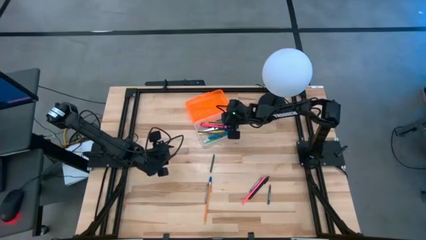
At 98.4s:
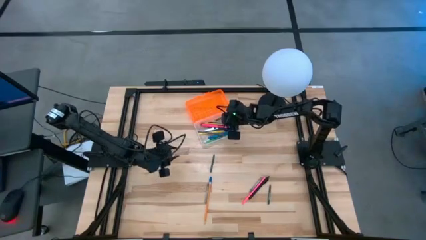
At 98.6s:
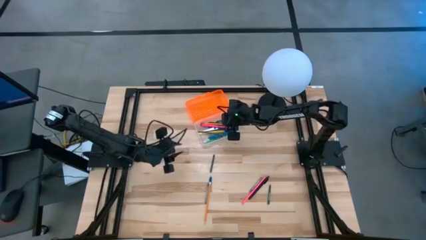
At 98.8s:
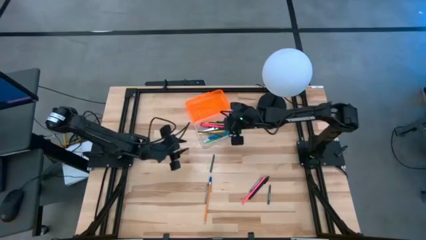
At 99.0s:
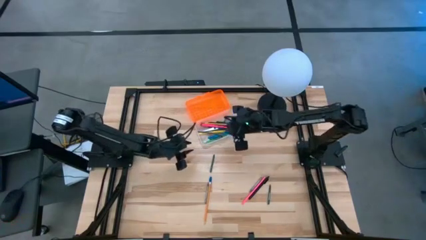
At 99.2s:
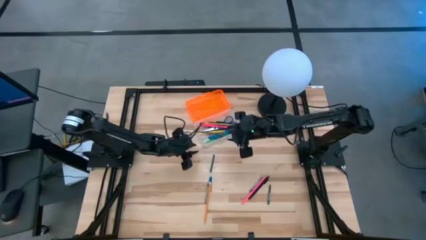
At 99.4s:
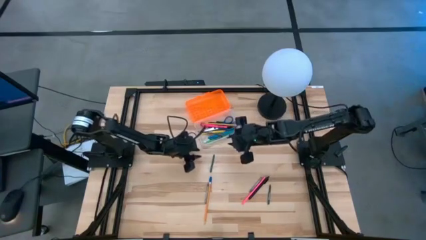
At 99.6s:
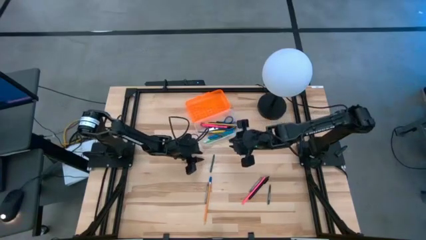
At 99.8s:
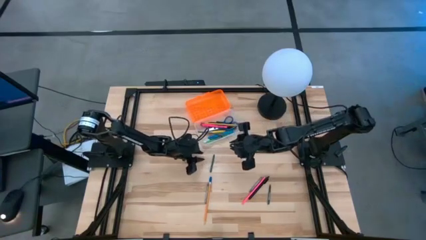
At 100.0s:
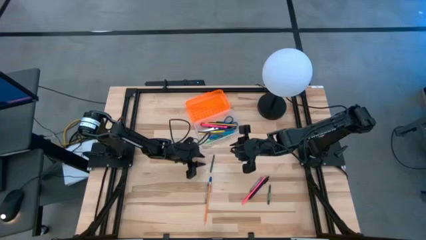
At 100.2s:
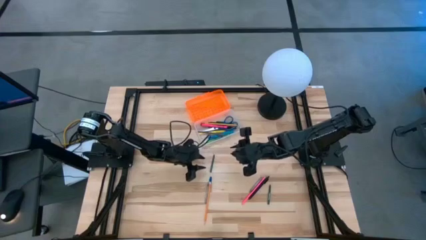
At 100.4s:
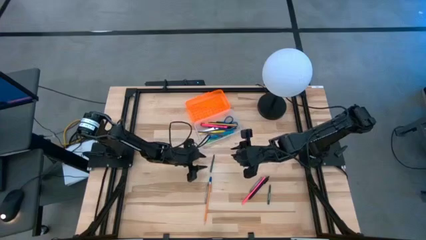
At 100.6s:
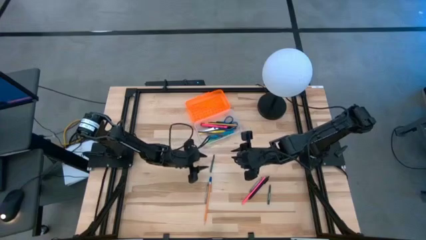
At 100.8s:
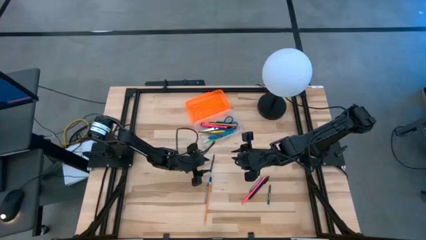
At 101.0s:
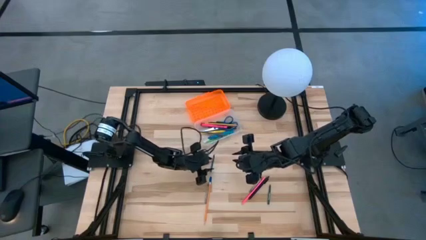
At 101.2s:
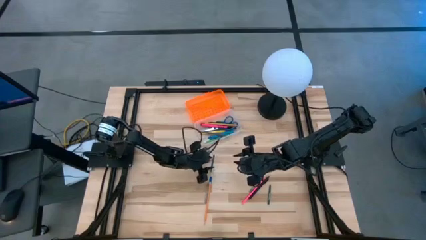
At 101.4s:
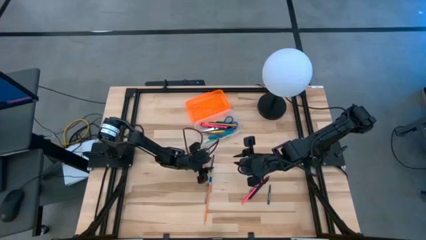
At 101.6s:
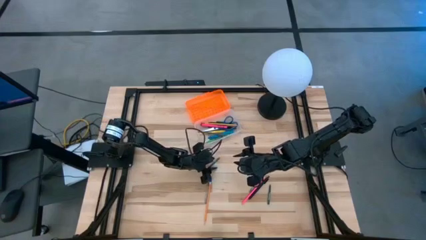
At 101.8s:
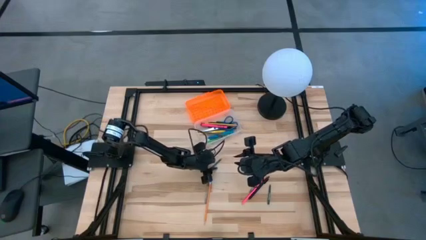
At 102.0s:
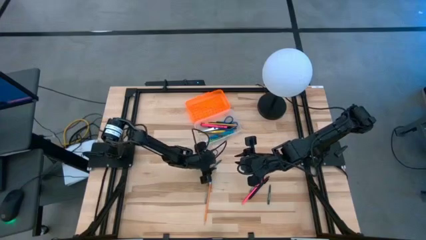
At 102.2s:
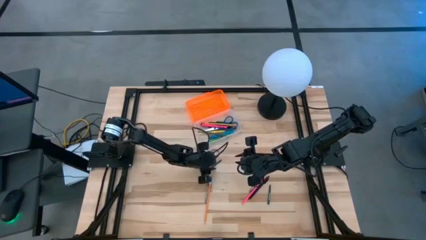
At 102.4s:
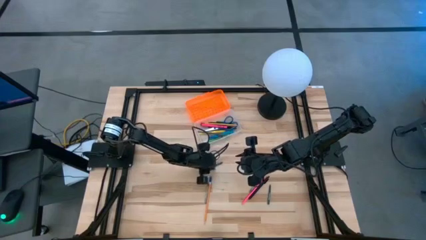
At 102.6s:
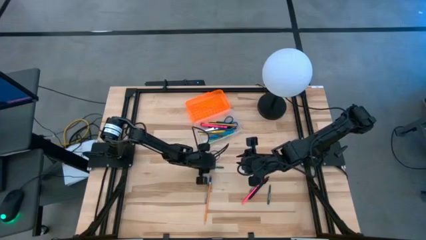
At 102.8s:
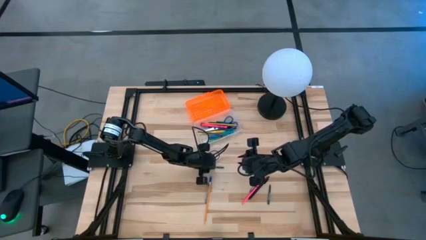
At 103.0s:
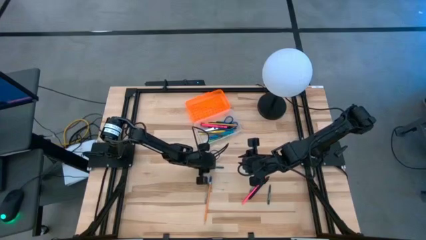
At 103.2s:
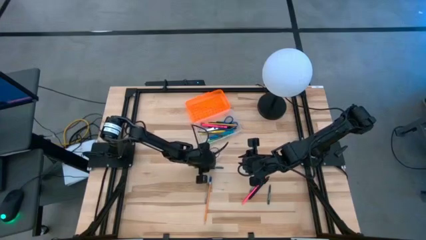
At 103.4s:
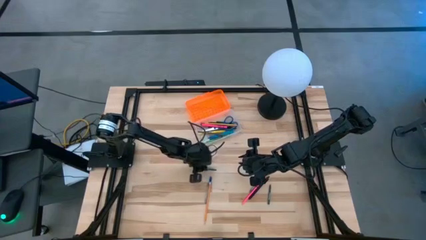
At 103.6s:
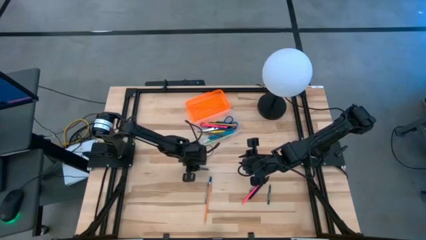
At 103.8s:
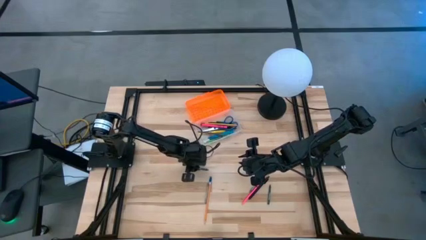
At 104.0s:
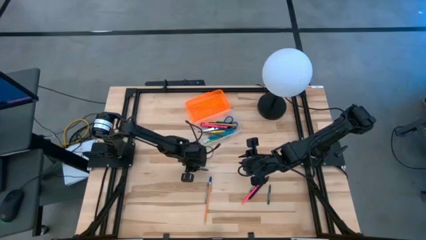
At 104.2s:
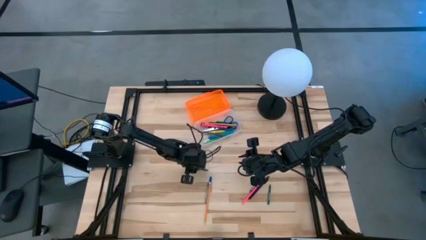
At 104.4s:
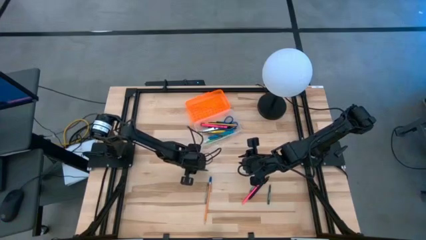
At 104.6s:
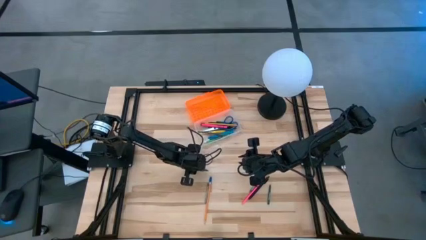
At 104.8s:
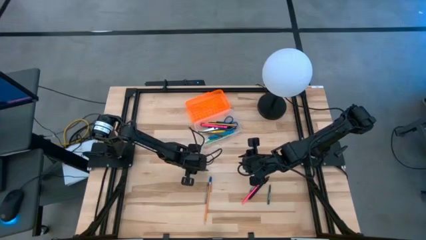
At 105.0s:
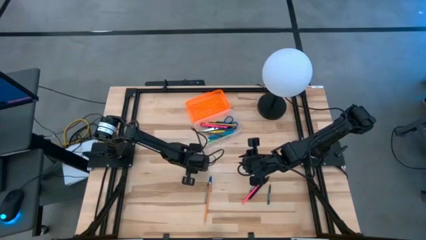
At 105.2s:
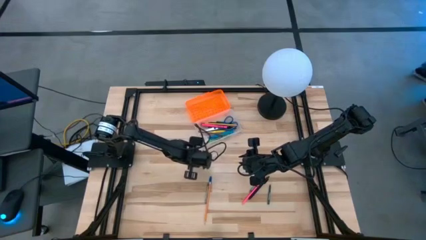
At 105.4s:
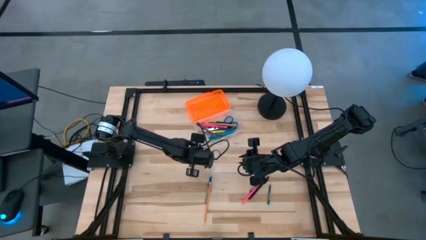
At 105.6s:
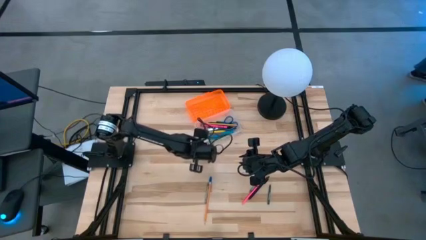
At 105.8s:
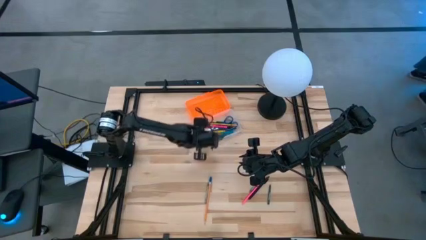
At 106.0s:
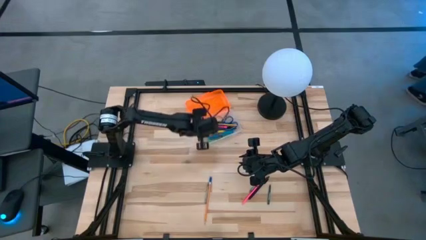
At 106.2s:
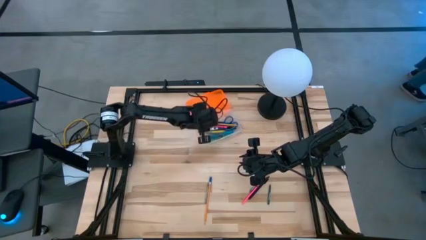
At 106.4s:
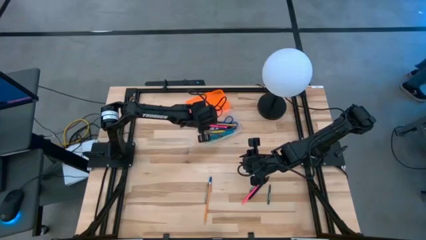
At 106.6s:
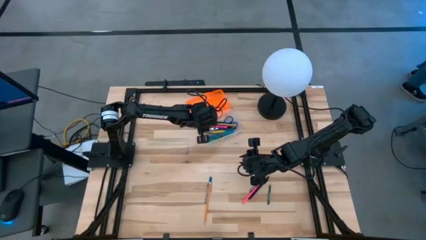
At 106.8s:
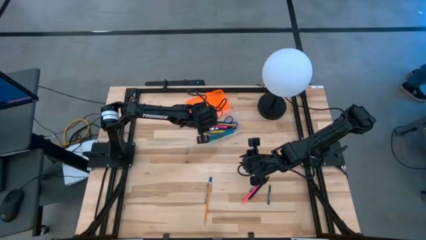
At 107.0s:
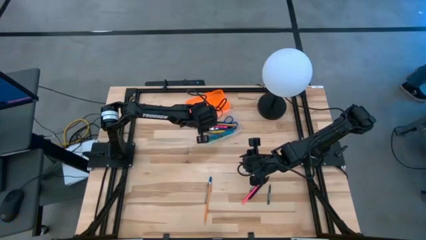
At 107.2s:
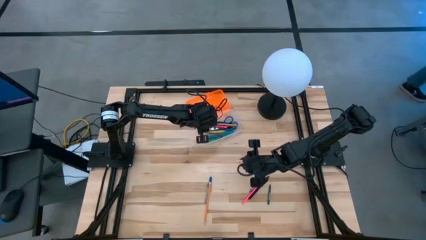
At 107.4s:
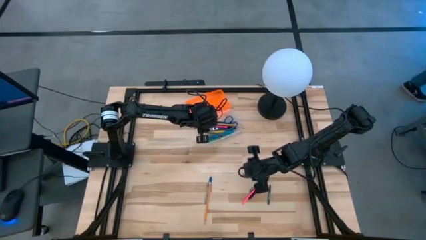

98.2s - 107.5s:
Task: Pick & place school supplies into a supply box
Put the top green crayon into the supply box

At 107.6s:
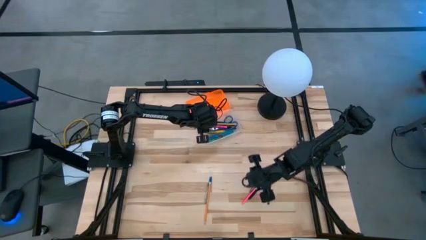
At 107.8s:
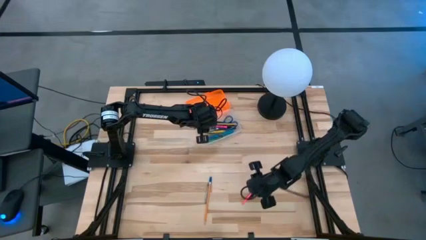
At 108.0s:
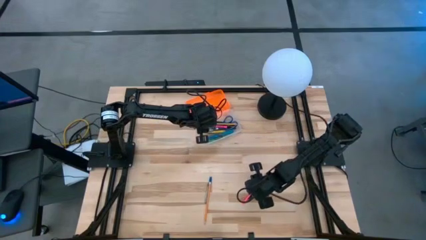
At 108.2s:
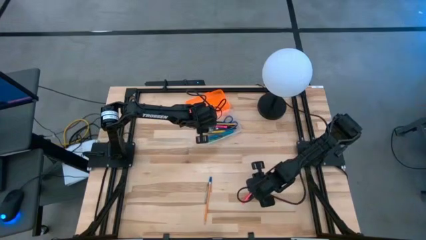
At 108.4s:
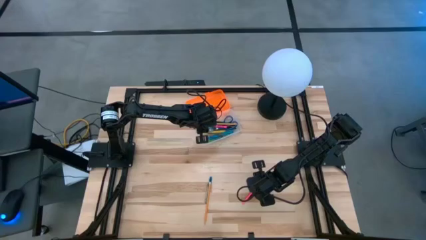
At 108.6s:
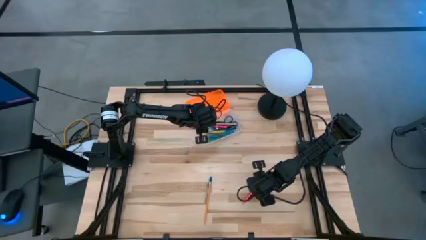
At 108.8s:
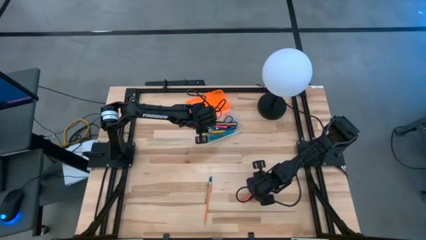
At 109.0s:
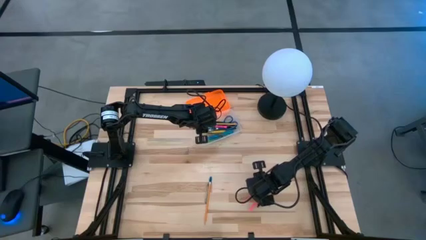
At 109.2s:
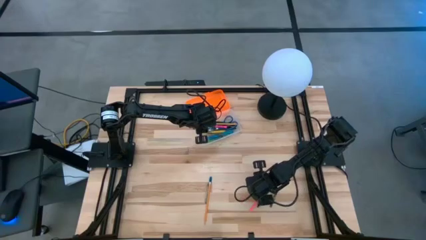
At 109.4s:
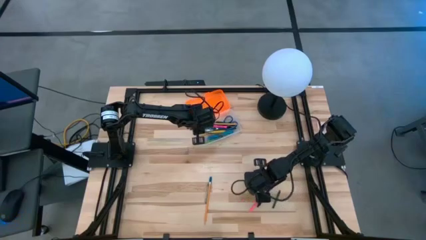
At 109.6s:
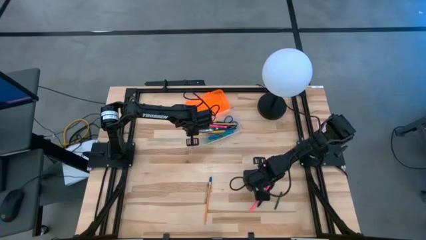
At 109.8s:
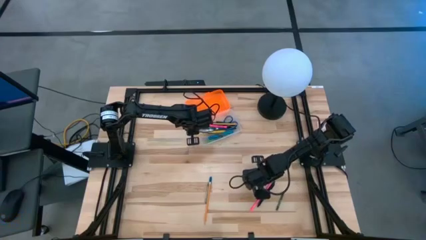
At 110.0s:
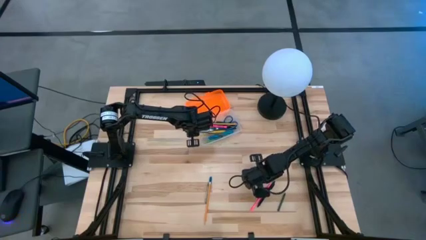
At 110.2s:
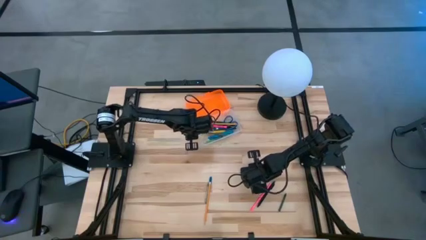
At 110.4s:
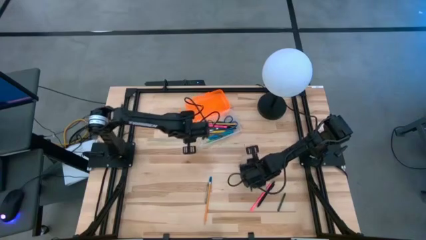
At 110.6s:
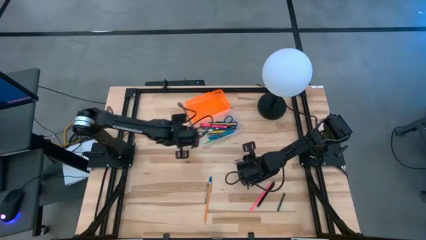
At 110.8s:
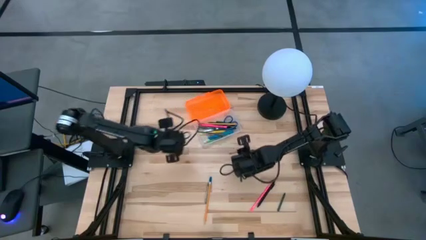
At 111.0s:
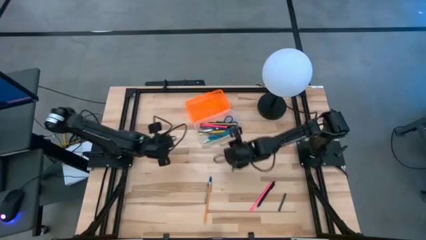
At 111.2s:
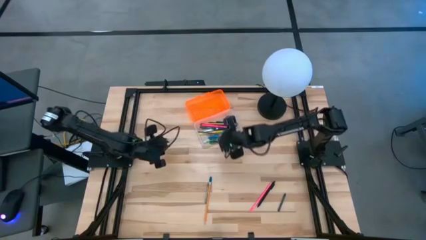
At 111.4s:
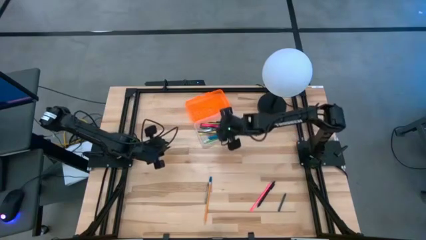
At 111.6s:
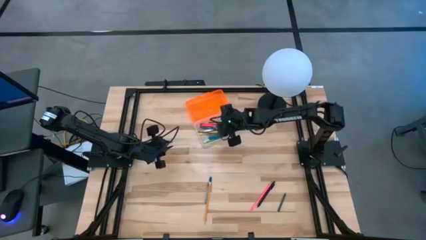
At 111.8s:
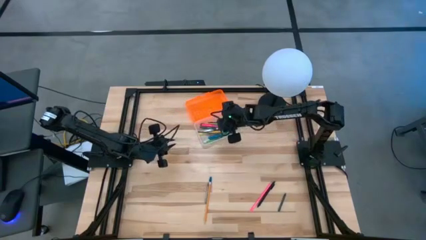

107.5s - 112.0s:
Put the right gray crayon into the supply box

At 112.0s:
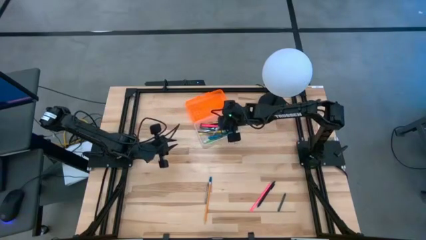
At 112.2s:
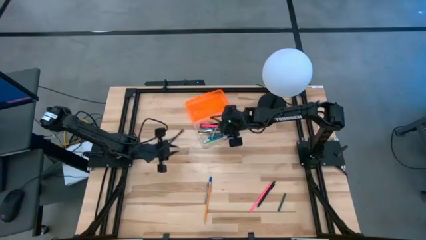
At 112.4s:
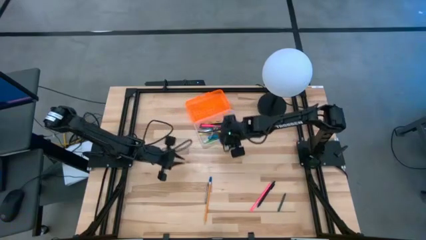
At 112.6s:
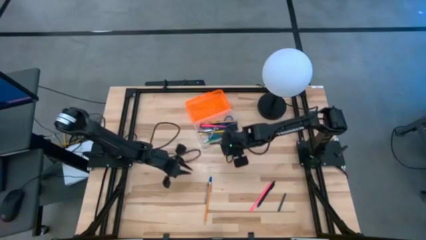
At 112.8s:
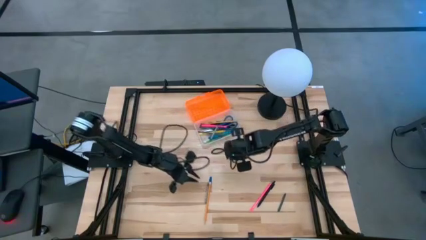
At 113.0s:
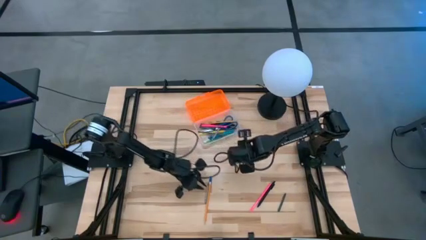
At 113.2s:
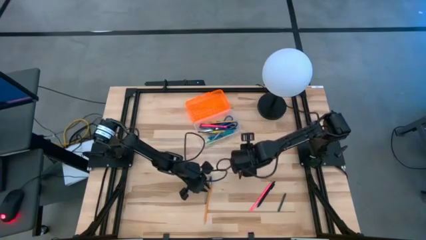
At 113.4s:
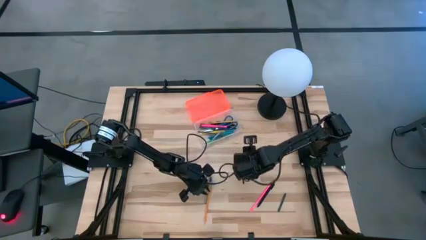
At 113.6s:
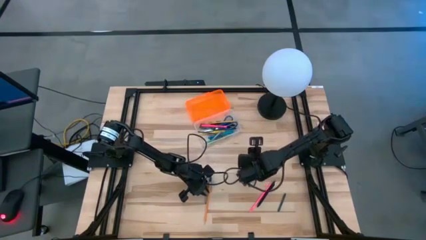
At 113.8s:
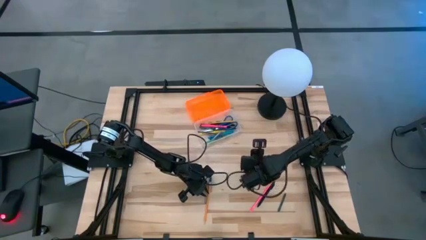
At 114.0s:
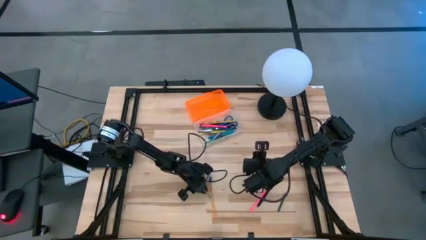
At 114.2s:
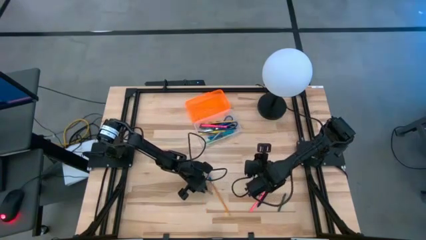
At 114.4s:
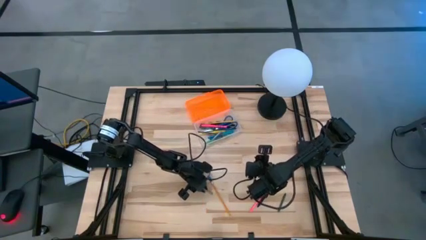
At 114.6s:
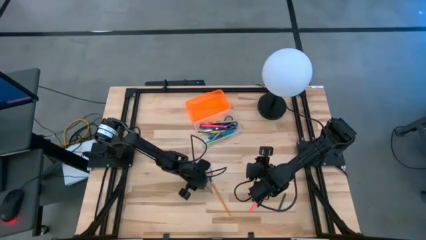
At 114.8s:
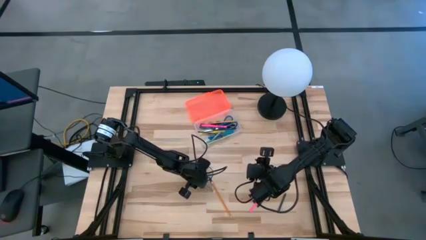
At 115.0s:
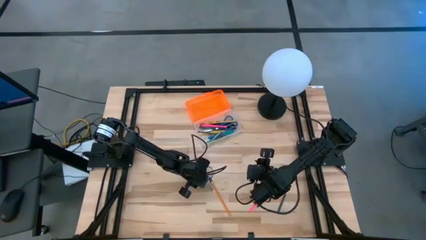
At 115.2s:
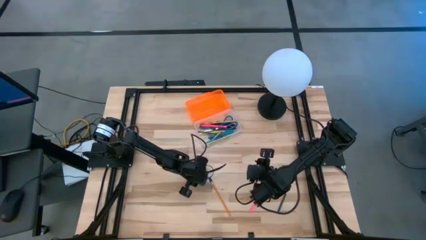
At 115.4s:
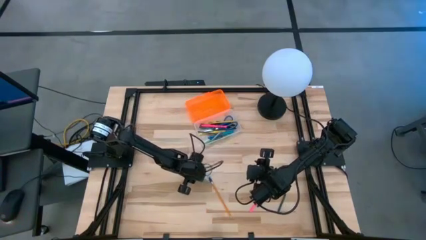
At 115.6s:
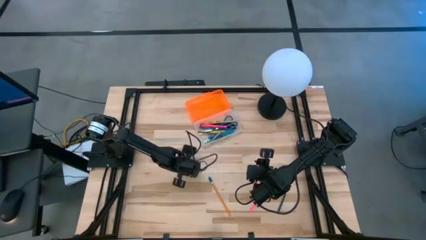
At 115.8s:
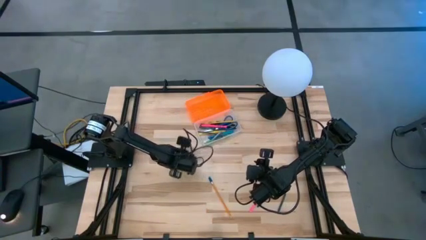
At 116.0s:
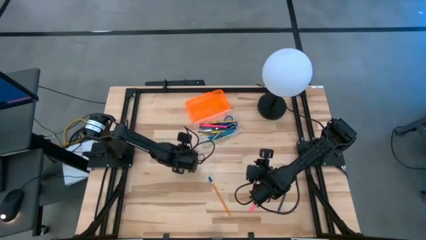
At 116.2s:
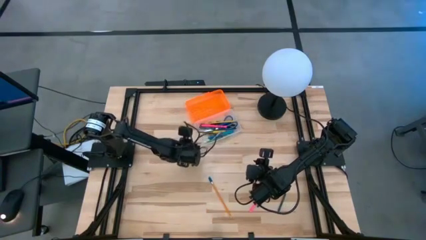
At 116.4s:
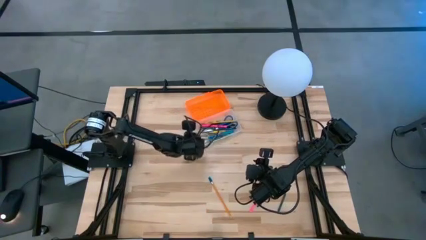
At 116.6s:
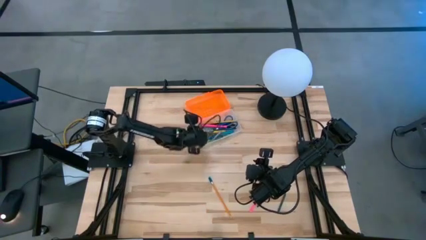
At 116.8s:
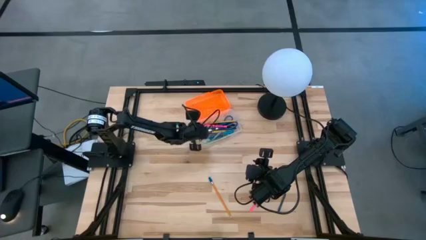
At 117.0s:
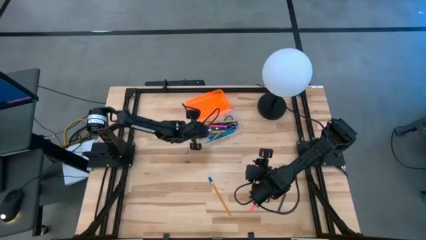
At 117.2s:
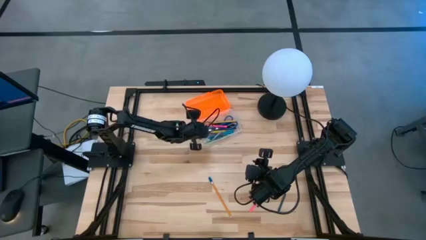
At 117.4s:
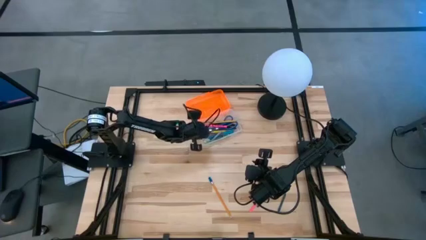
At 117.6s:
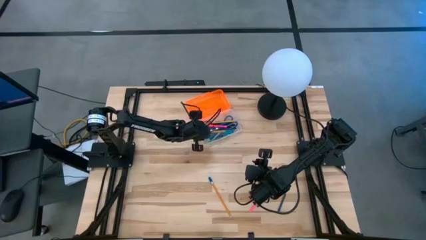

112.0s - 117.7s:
Put the gray crayon into the supply box
